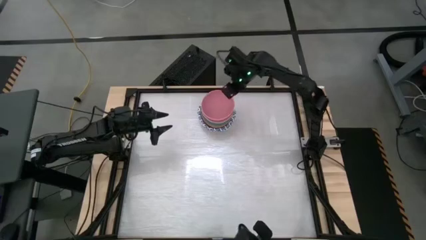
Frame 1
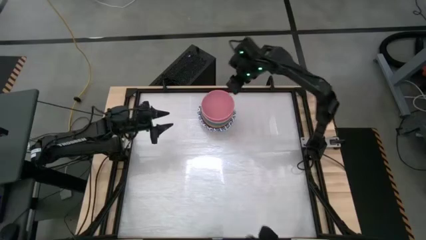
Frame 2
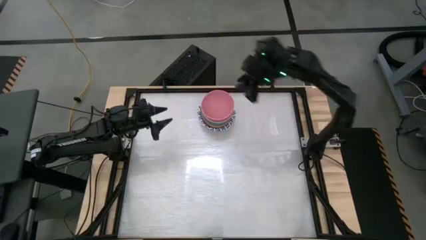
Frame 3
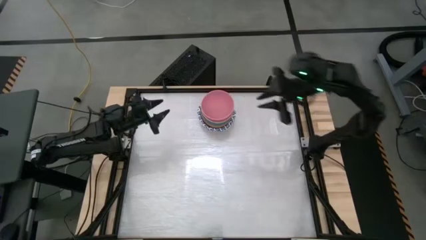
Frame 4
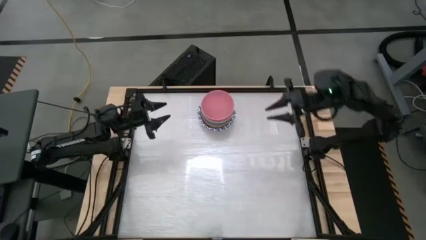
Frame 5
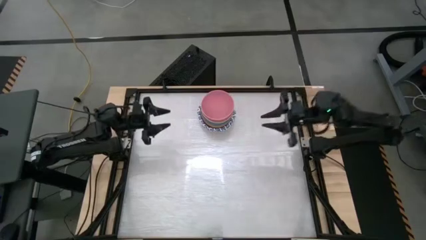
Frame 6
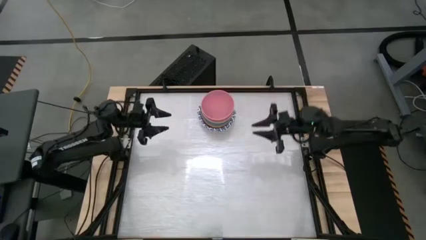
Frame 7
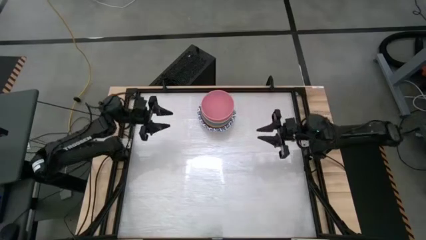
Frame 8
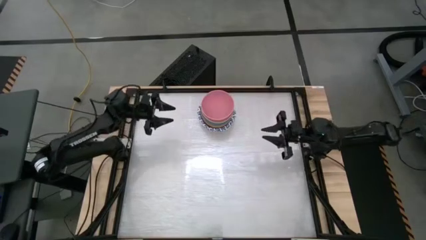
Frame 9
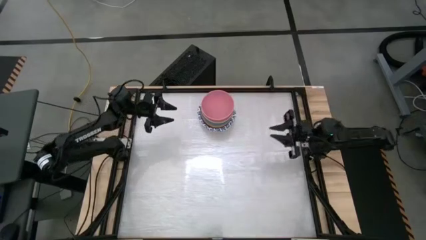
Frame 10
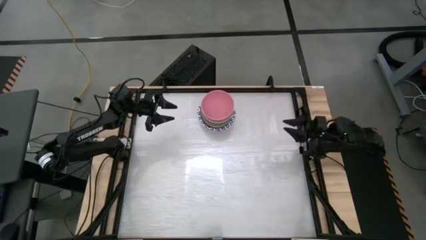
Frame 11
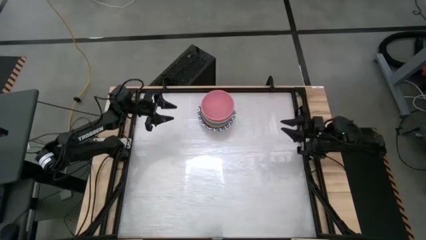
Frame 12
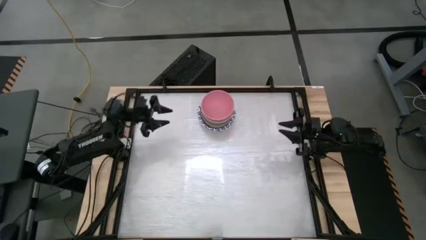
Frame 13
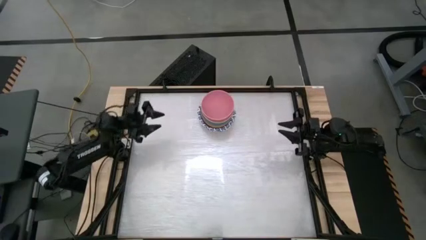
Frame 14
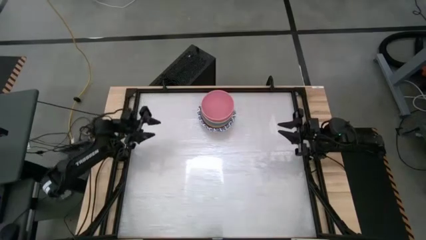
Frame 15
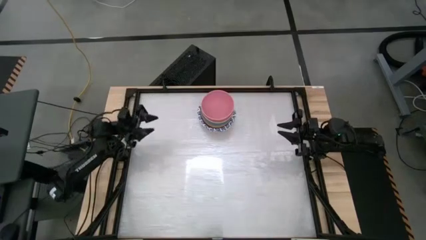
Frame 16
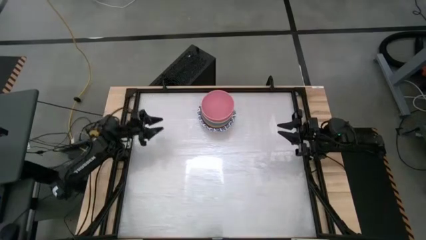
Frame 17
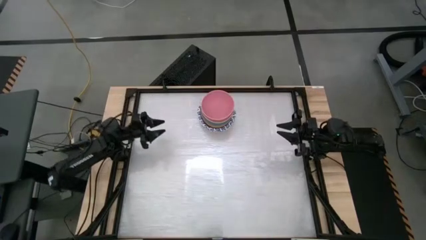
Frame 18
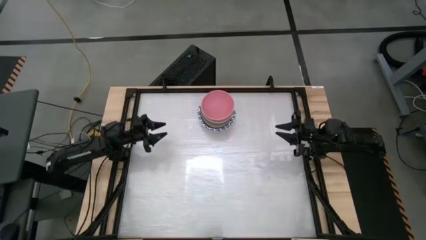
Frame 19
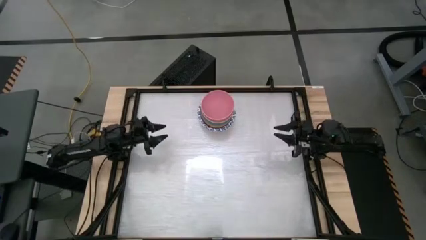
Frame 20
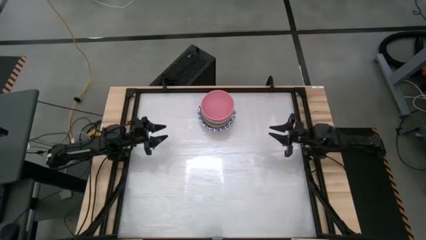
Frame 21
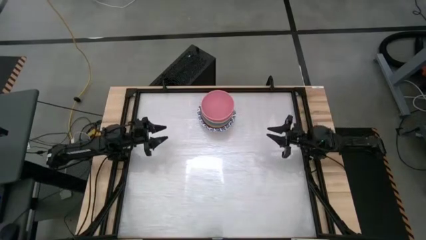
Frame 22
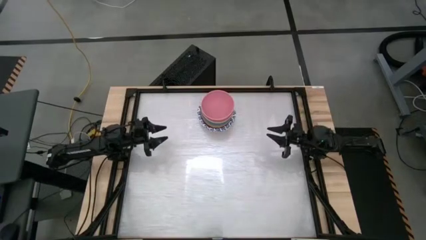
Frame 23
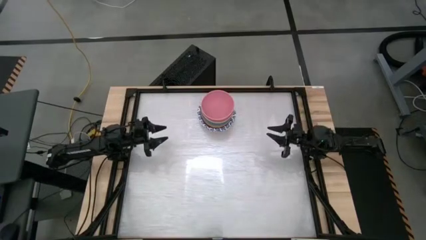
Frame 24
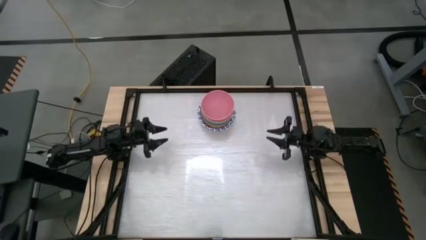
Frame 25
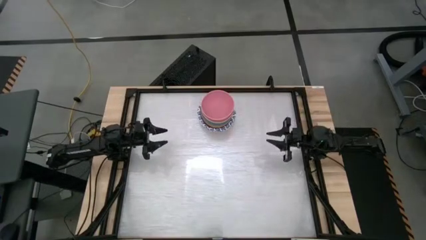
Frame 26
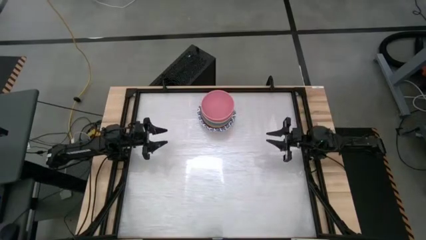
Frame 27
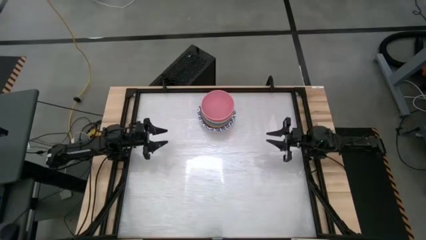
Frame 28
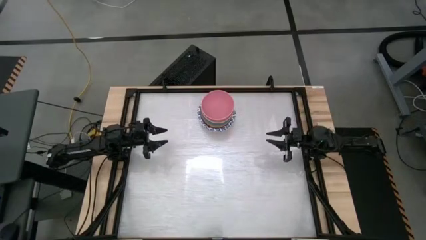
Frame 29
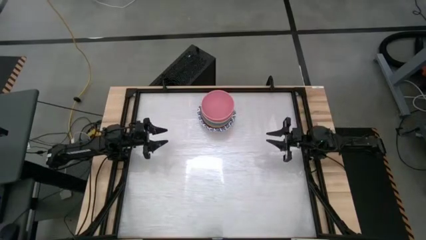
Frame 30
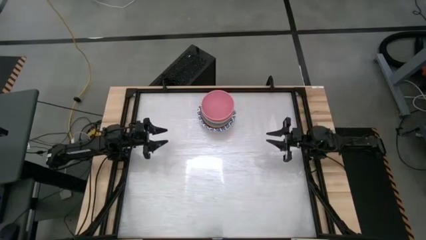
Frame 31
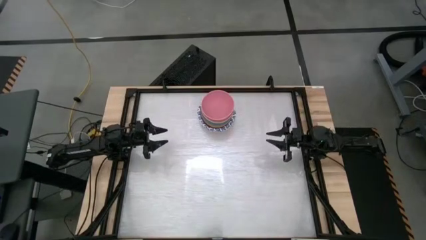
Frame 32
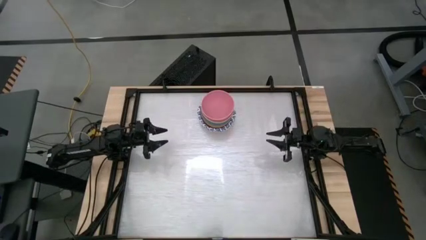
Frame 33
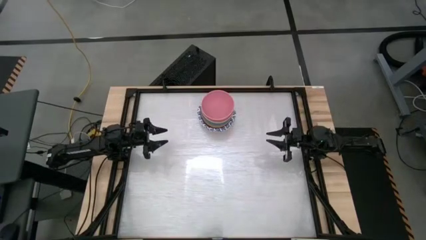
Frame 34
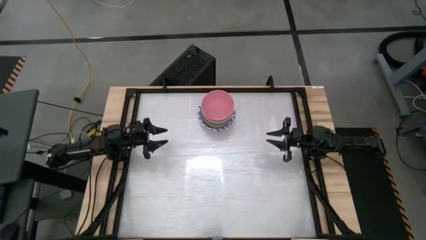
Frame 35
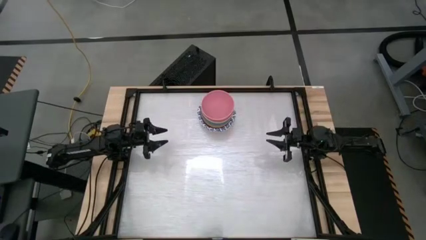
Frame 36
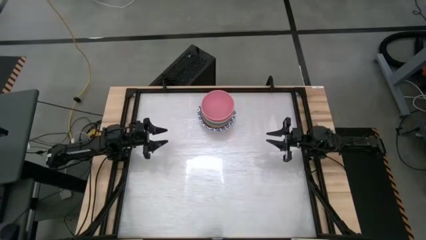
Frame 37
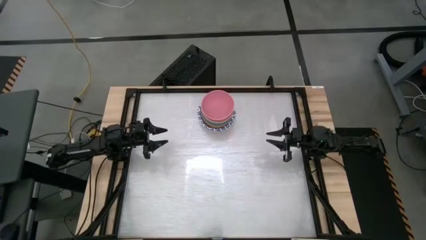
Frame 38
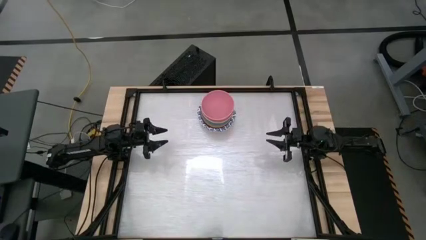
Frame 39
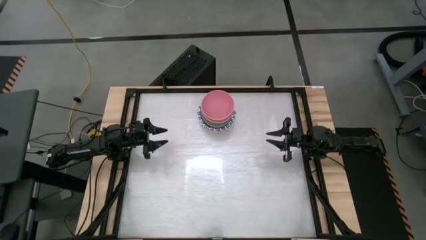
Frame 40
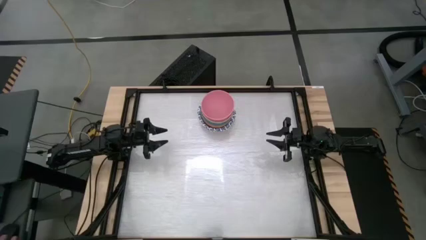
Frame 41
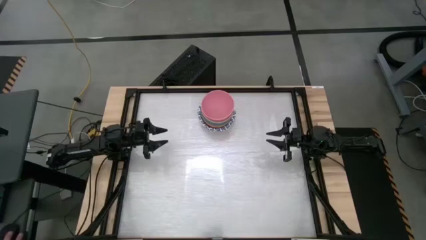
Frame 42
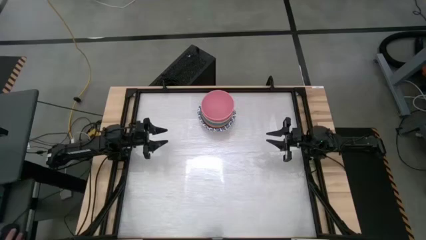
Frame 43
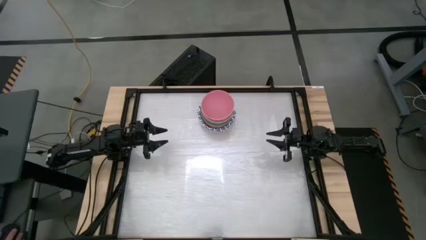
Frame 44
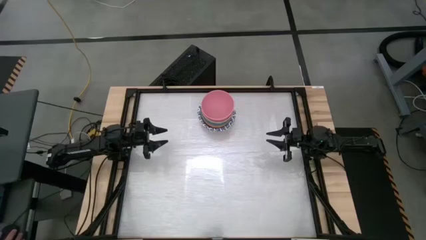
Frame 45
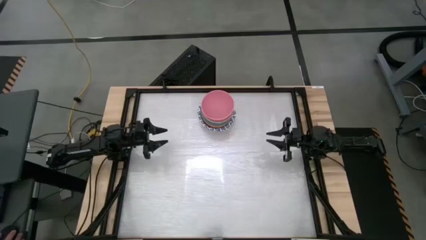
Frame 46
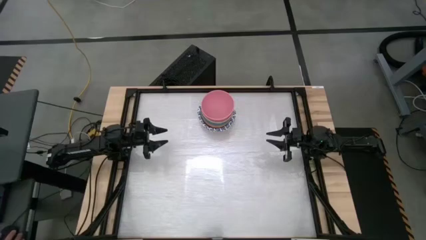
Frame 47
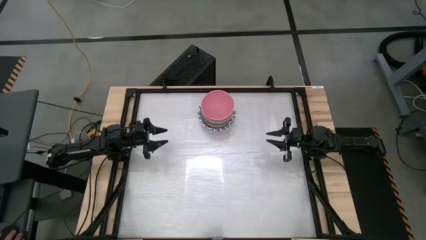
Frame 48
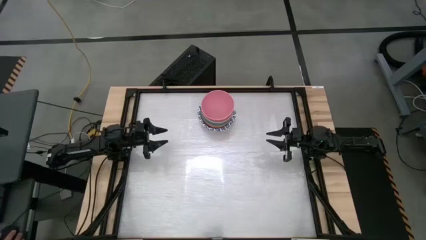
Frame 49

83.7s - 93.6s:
Return to Home Position
